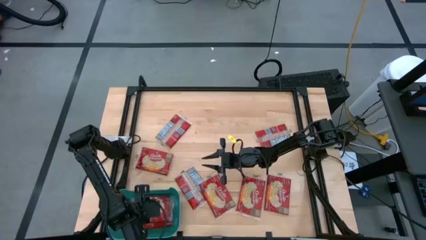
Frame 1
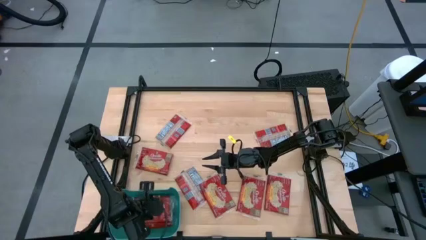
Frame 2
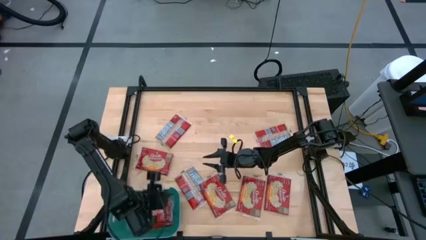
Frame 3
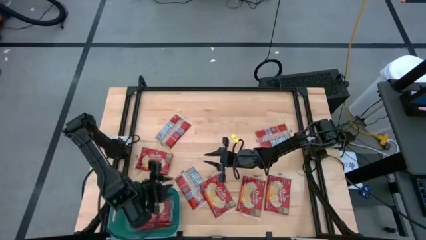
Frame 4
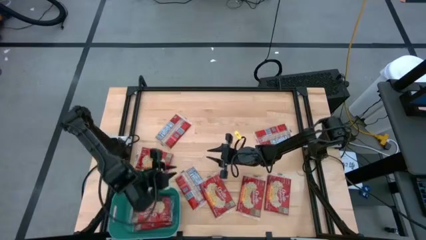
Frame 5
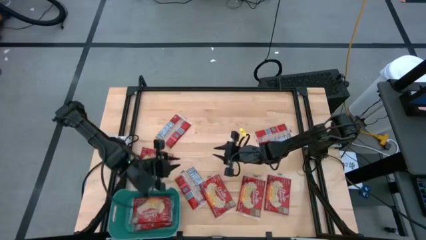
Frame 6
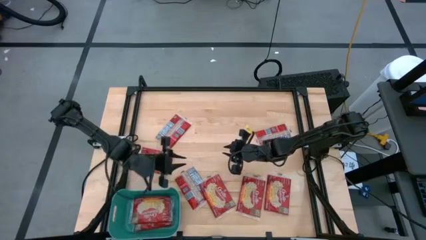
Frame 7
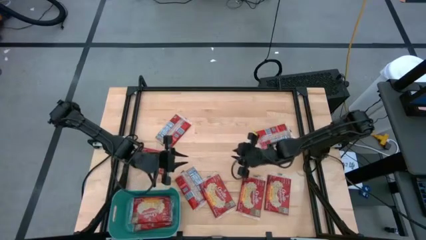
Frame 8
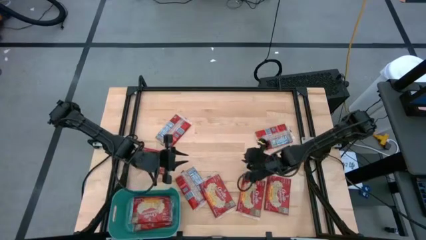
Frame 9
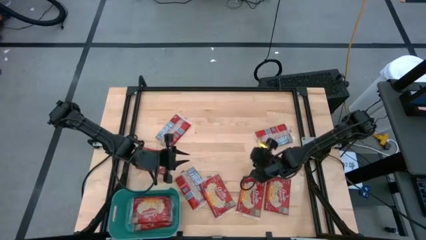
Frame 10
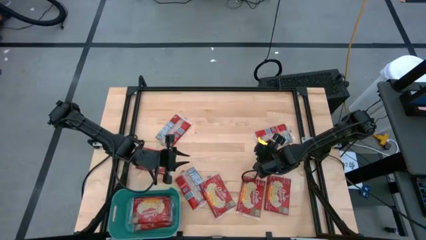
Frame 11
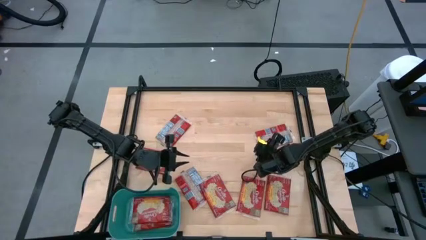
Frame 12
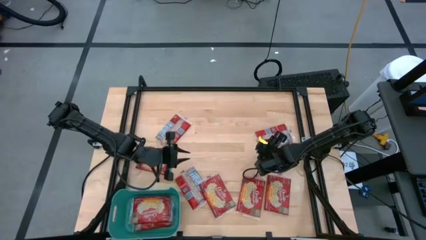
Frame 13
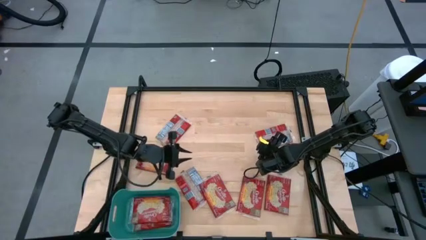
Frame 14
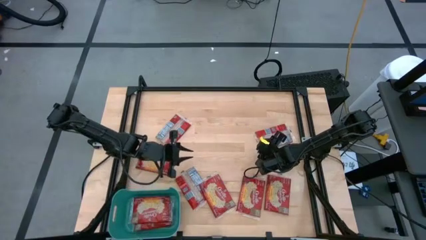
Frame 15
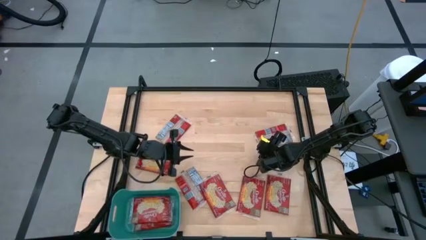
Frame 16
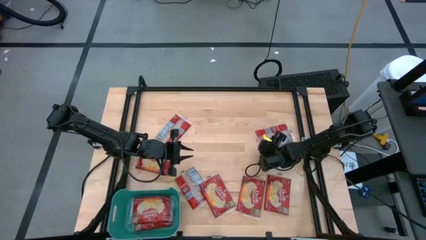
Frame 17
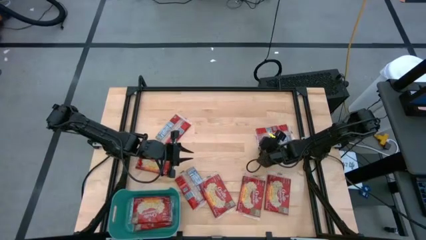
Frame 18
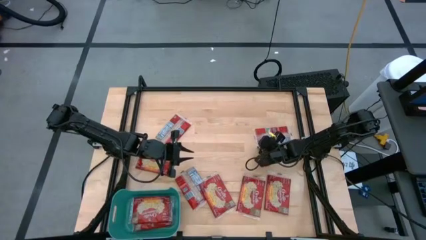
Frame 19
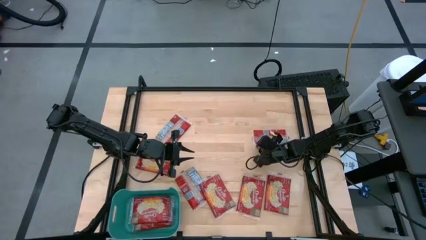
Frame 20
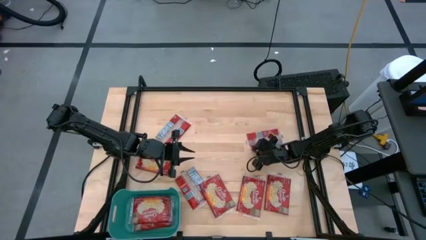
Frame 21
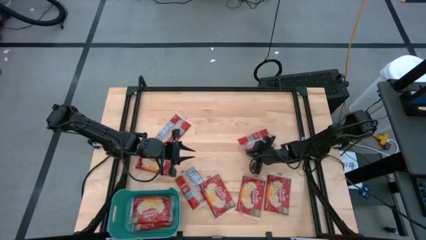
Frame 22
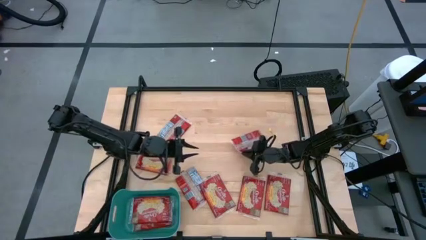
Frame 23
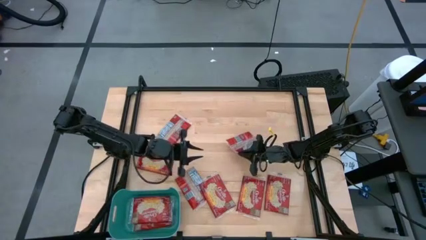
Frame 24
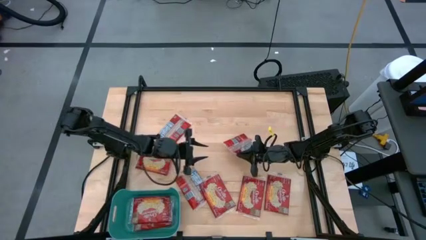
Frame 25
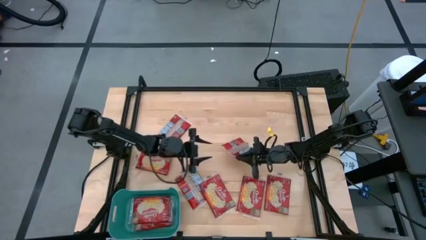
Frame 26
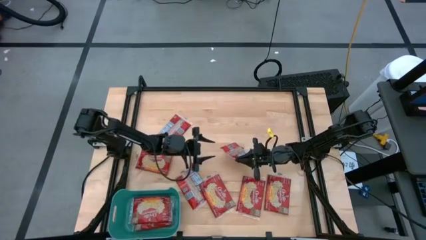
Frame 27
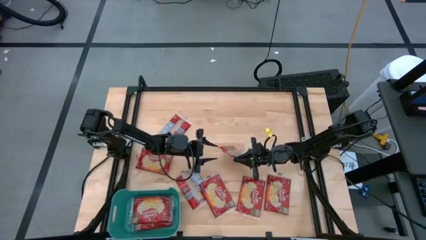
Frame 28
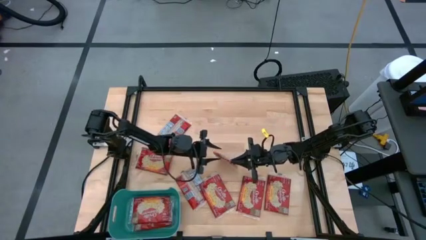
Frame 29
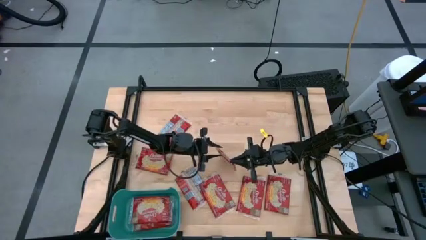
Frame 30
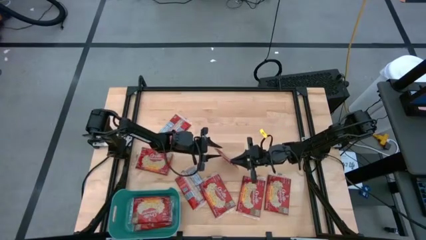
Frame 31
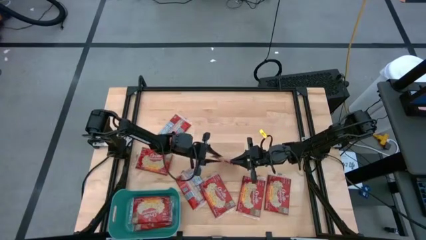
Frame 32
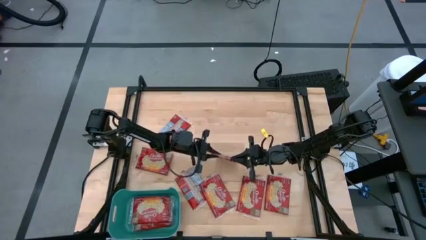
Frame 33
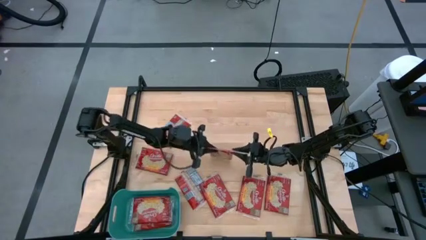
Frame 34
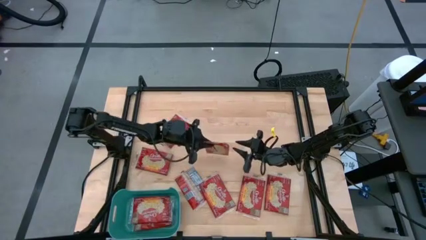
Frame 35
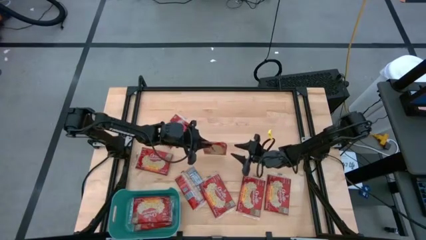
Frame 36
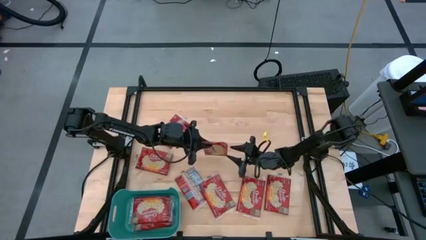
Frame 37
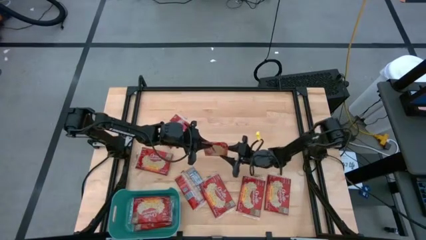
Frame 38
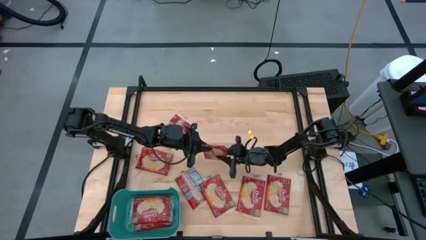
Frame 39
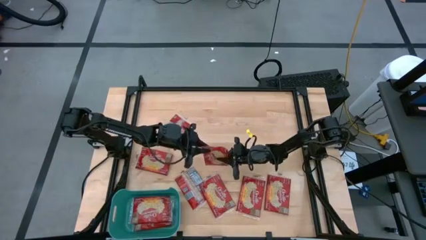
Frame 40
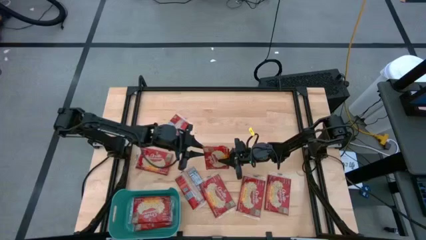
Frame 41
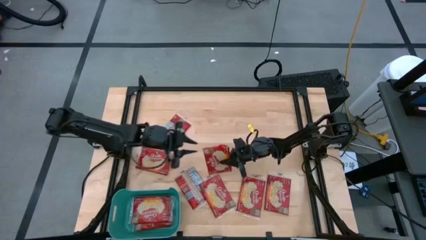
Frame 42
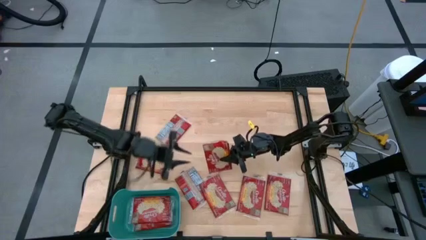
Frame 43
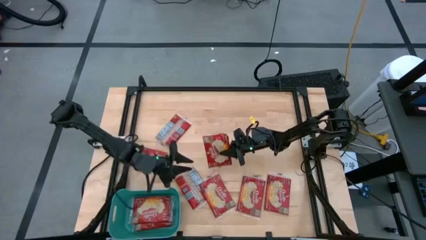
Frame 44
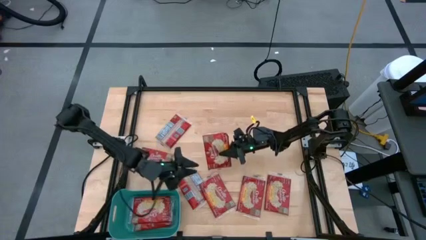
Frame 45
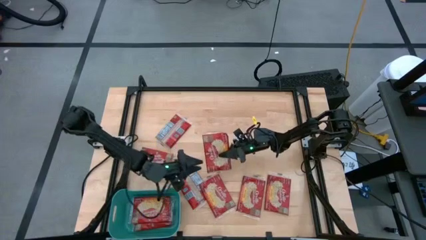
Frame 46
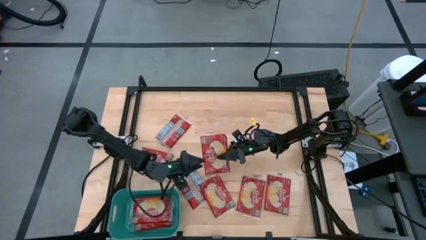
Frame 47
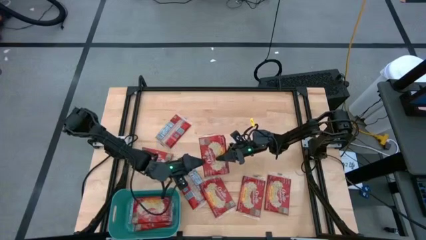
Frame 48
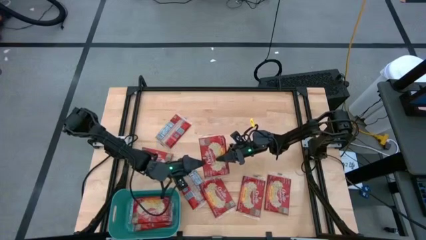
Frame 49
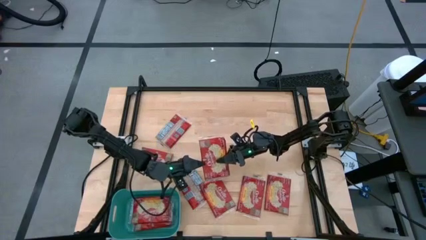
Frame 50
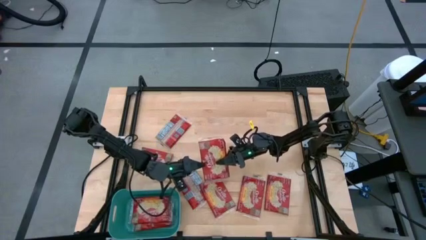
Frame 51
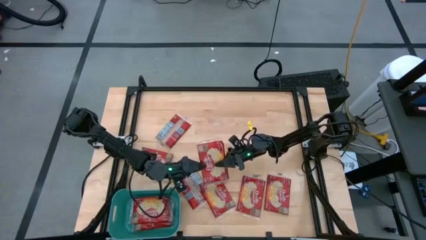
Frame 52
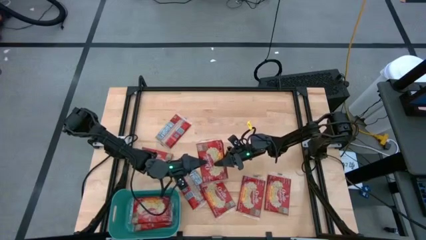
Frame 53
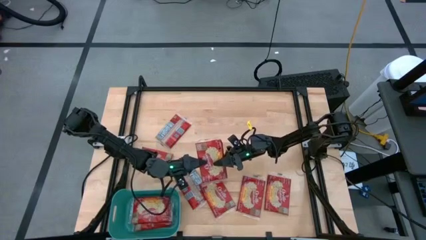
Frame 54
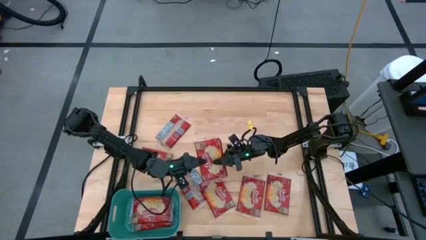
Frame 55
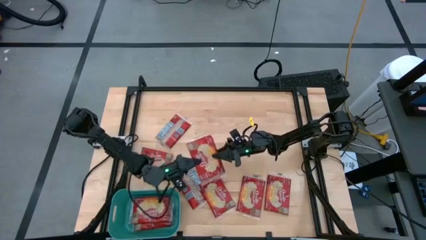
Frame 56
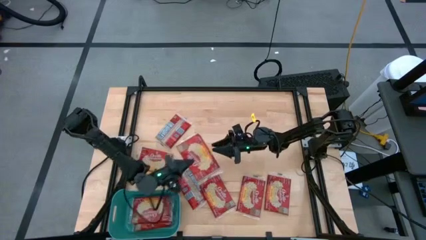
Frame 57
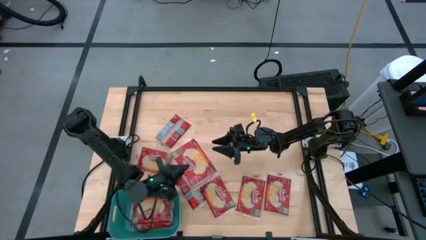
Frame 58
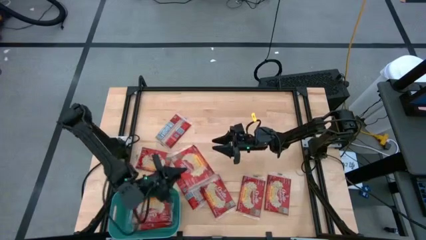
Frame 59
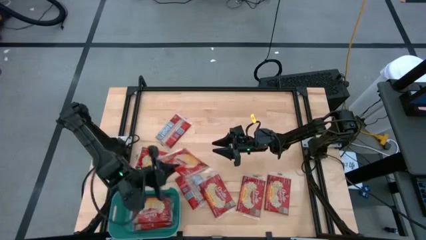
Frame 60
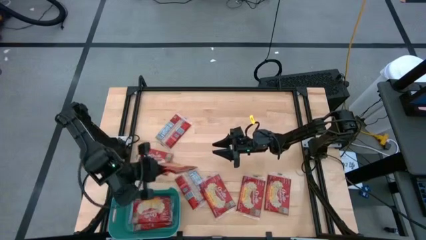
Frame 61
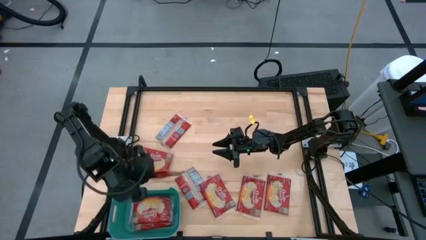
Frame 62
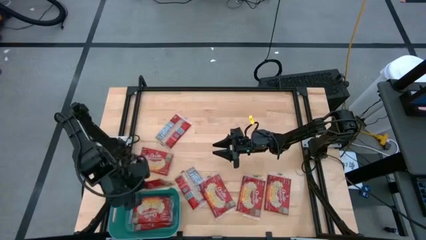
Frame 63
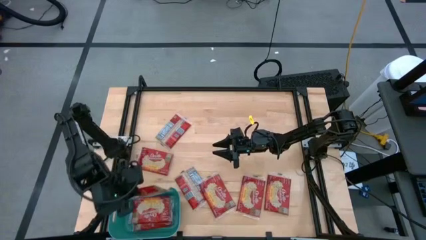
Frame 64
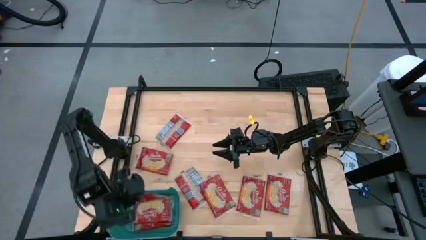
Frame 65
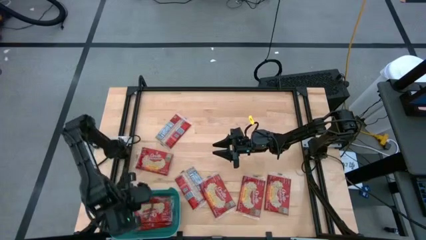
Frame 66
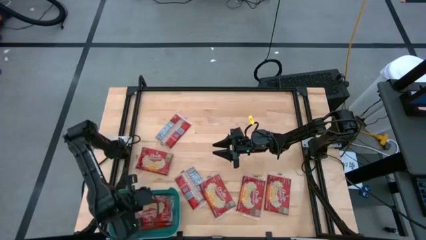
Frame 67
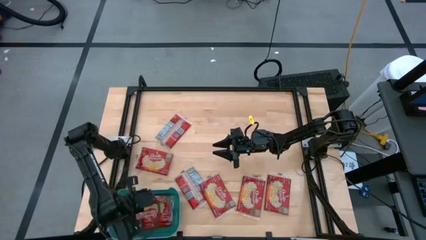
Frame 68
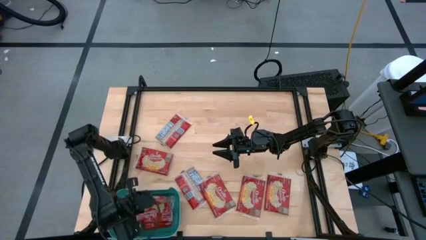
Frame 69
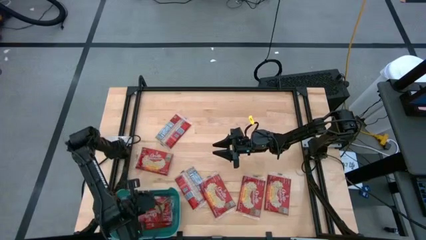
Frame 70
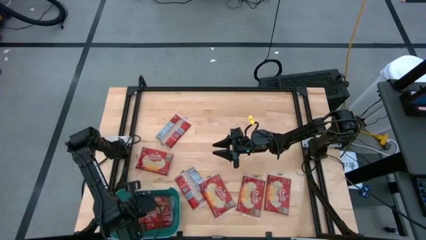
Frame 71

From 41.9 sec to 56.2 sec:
Task: Sort popcorn bags into baskets
Put the red popcorn bag into the blue container

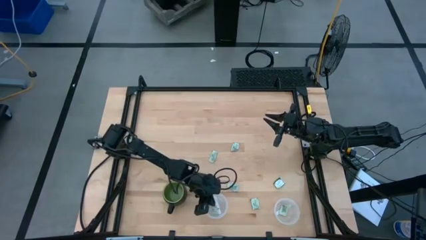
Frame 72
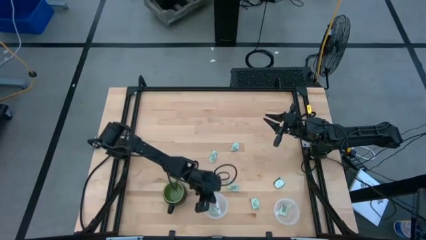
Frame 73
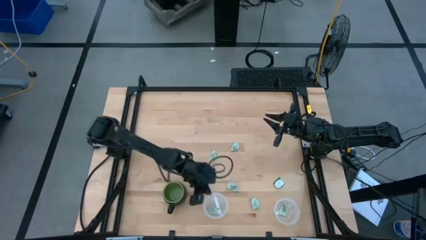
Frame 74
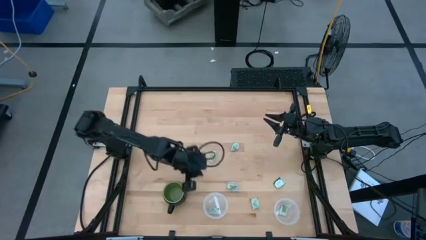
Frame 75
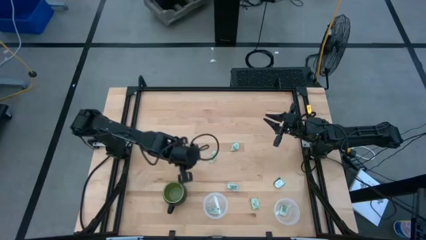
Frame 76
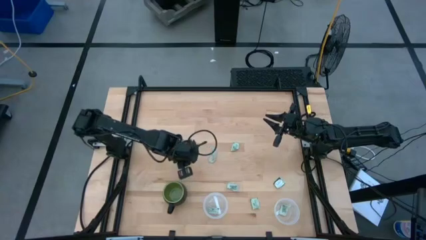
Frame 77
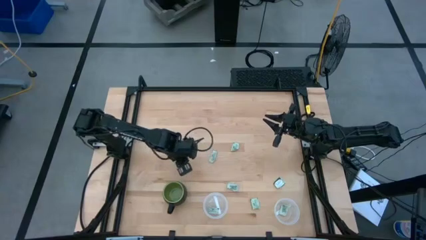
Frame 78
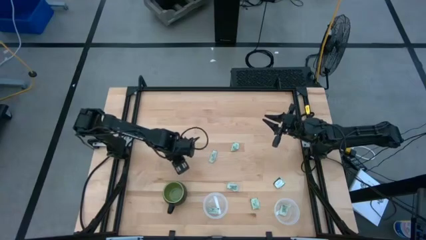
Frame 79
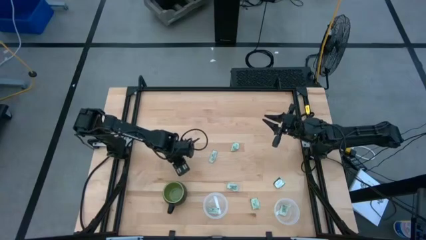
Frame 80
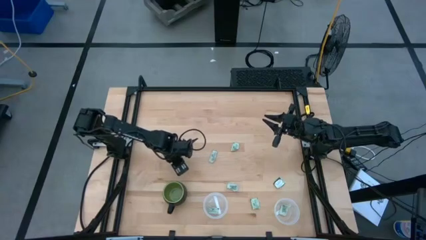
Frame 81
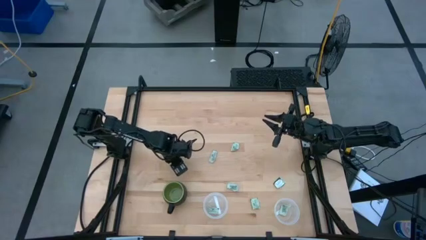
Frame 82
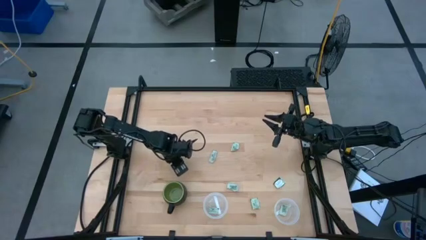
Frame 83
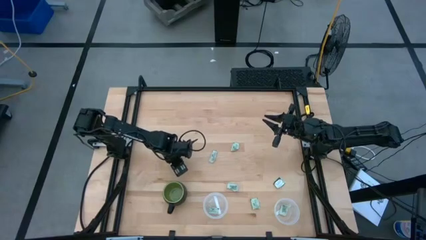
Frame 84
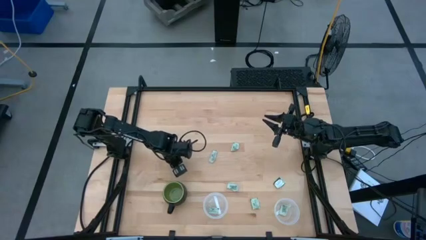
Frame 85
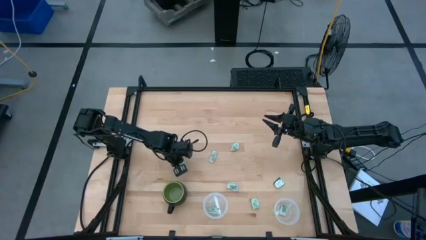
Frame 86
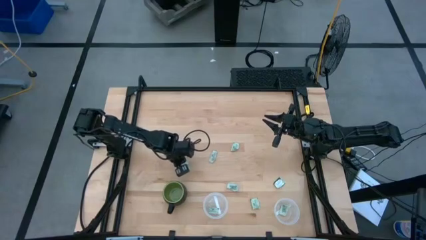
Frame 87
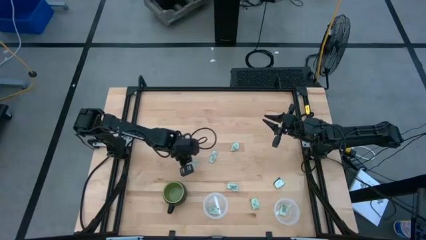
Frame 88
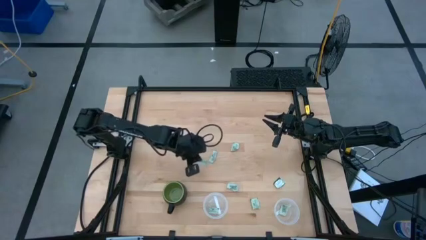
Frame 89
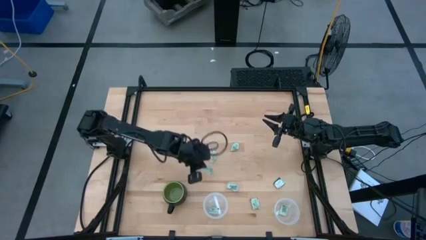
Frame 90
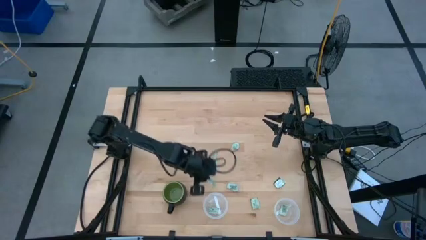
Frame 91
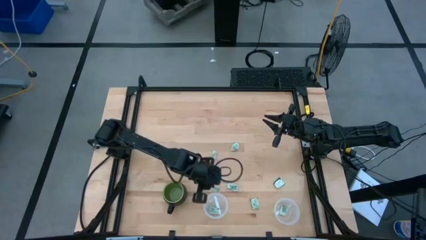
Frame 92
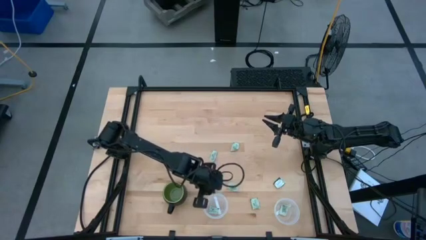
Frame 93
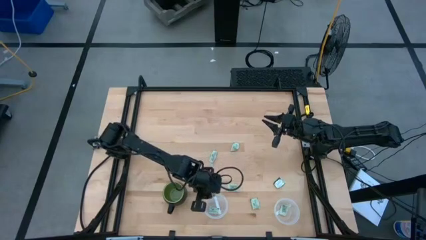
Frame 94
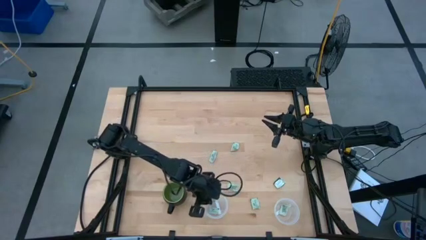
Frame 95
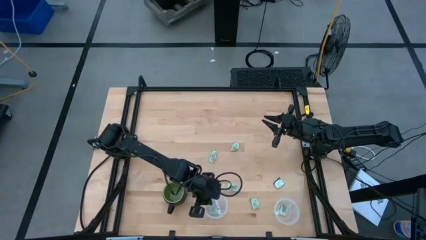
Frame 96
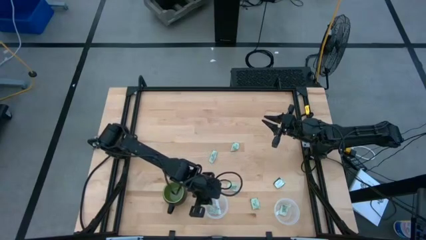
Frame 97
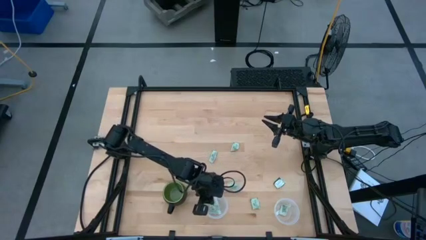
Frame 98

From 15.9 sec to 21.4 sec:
Task: Pick and place Stevia / Truvia into bins
Put the green stevia packet into the left transparent container
